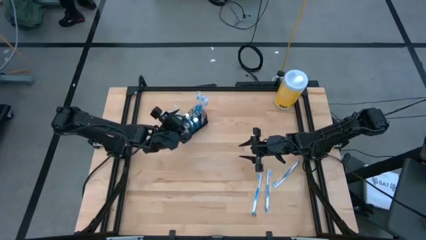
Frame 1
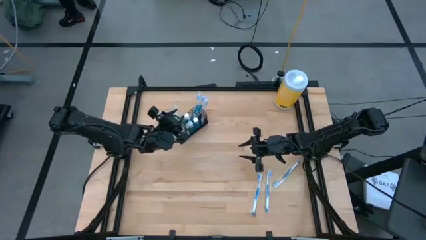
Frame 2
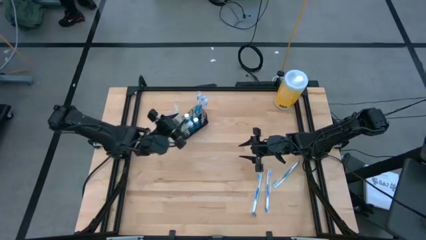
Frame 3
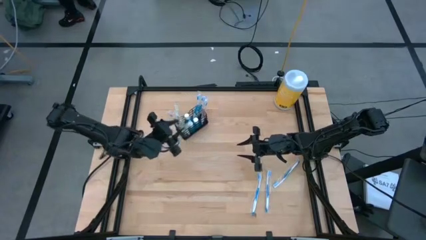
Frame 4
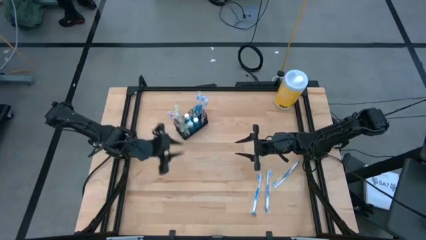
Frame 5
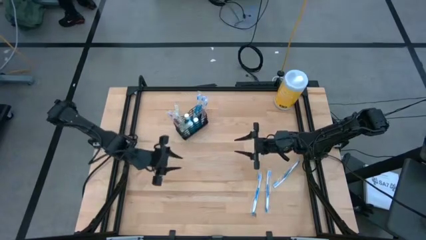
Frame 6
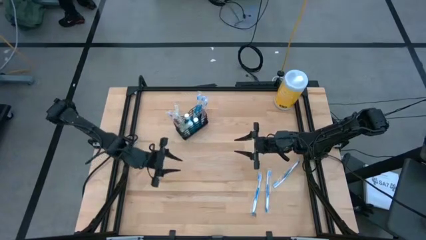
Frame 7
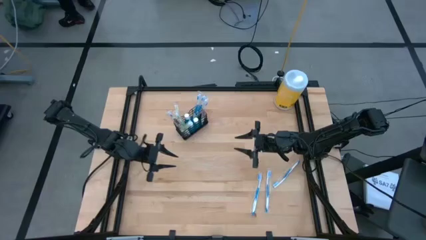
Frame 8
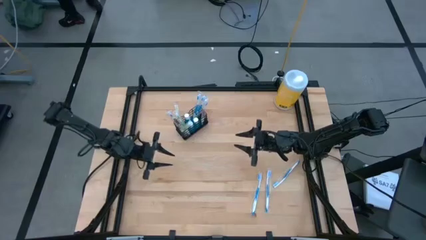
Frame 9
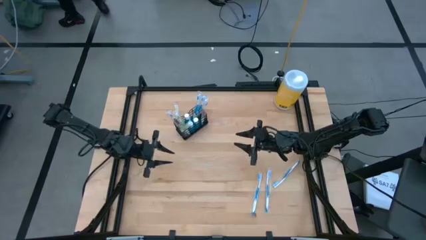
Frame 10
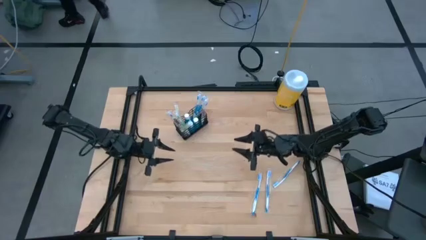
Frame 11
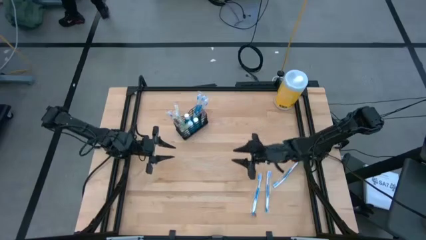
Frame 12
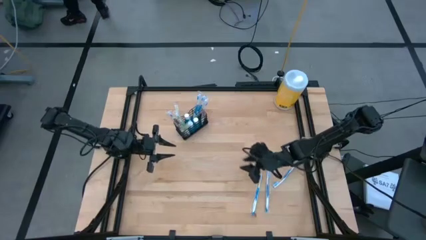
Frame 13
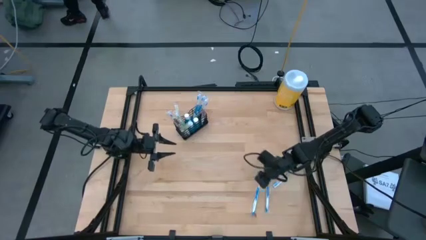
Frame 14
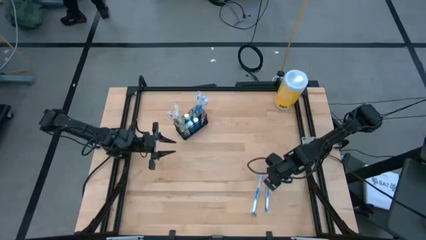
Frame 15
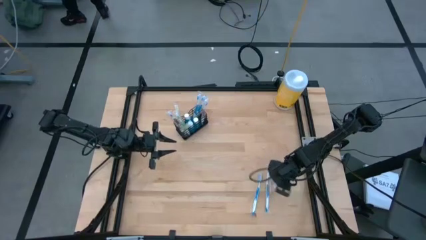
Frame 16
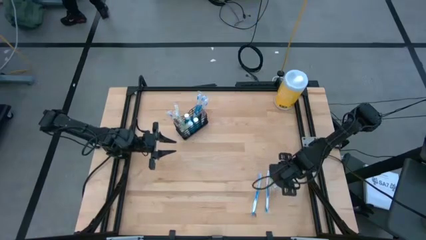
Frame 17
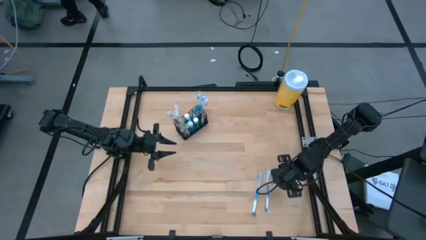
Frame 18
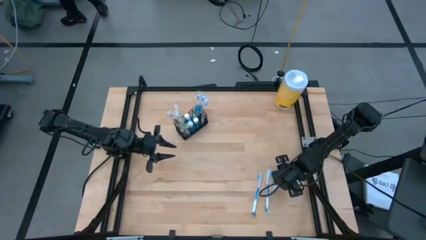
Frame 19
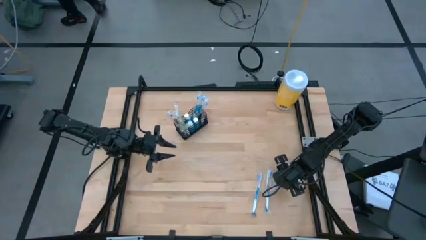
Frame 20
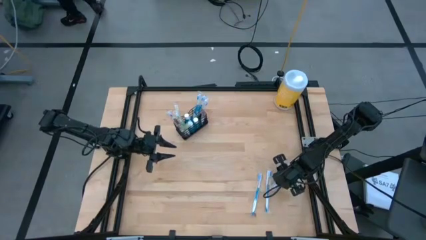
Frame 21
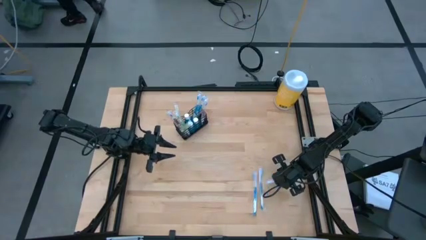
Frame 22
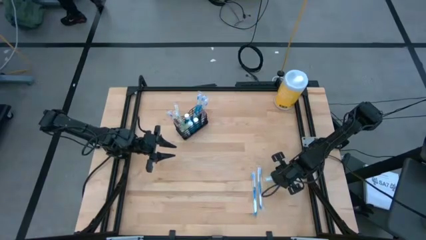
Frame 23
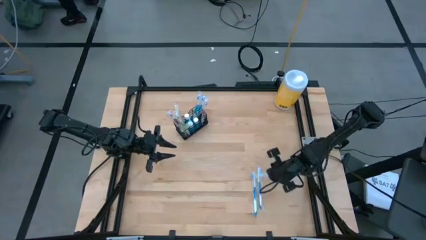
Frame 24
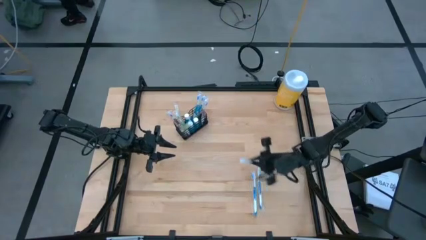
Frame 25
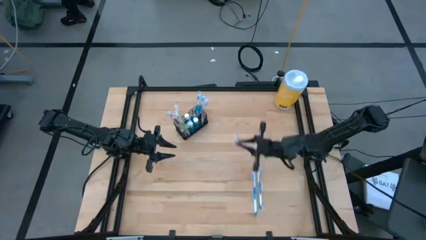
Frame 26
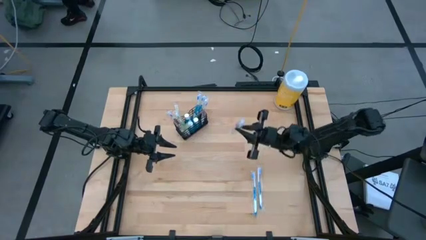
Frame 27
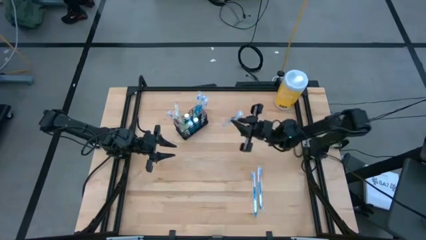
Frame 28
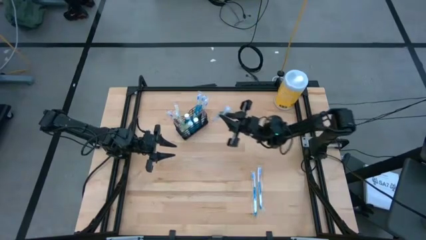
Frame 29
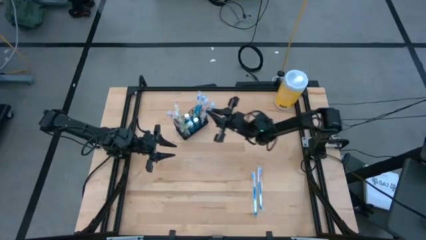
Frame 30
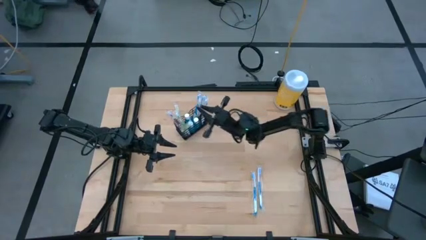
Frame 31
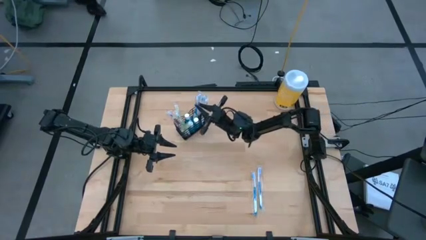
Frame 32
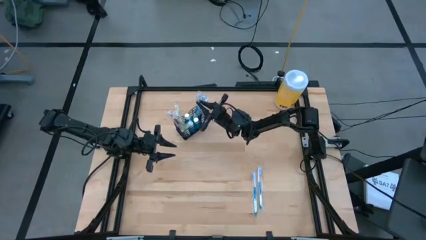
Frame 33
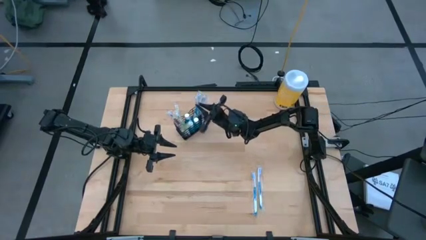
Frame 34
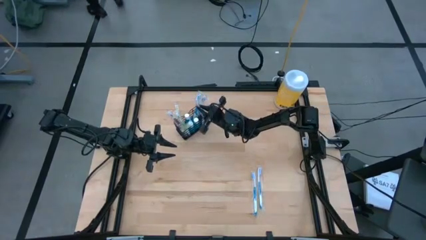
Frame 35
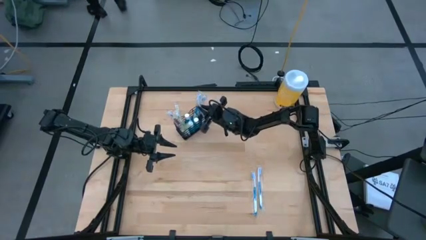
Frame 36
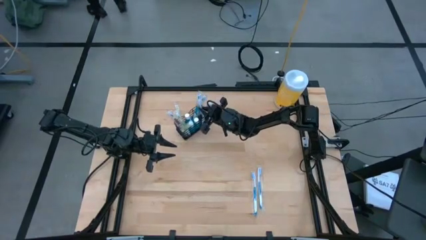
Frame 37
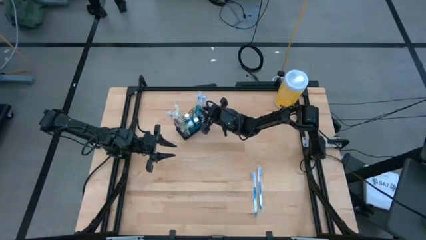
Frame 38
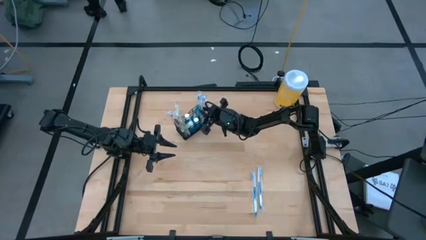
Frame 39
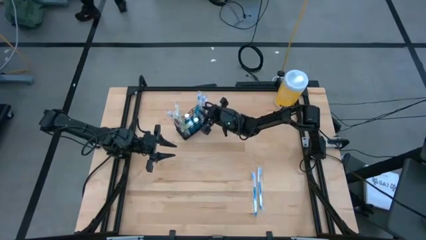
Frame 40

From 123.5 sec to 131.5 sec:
Task: Pick & Place toothbrushing station
Put the blue toothbrush into the black wire organizer

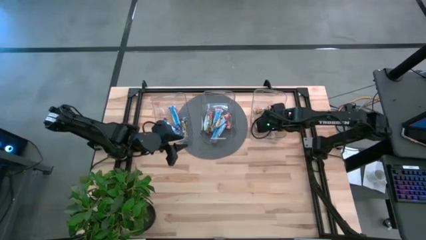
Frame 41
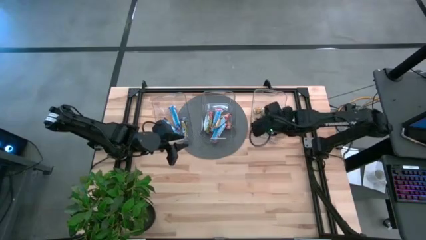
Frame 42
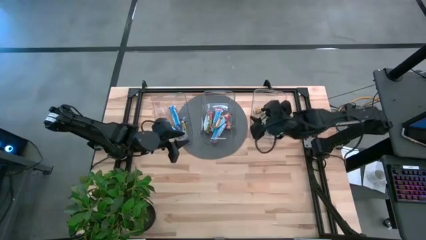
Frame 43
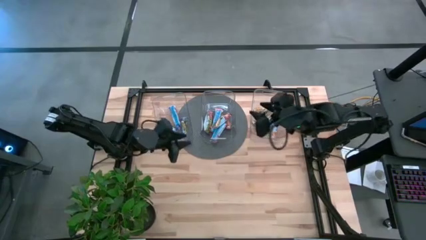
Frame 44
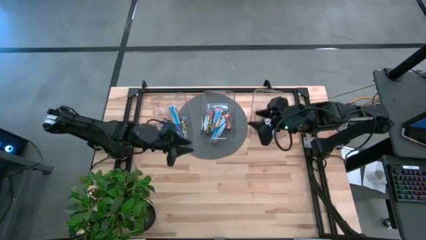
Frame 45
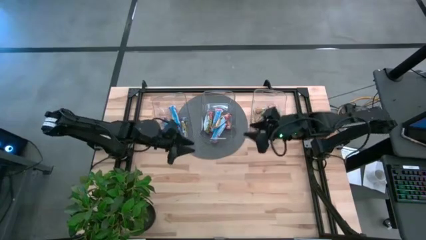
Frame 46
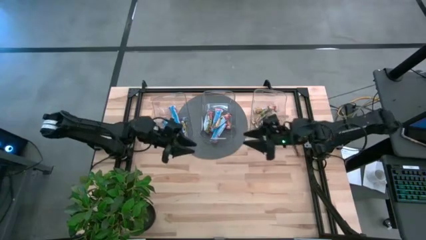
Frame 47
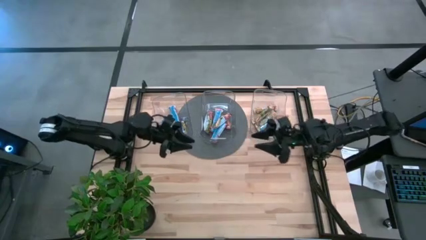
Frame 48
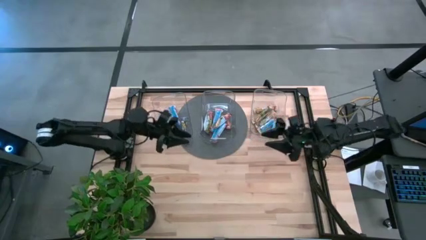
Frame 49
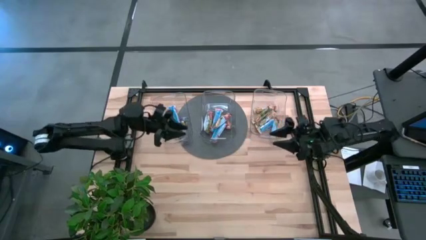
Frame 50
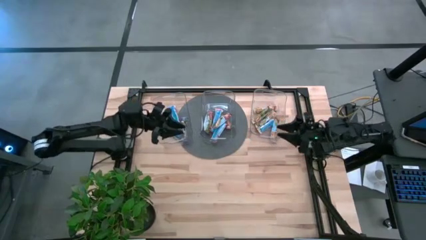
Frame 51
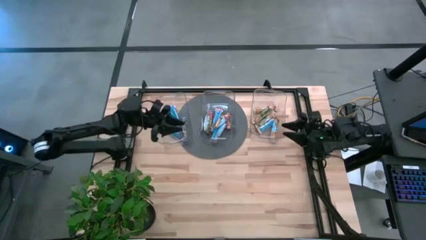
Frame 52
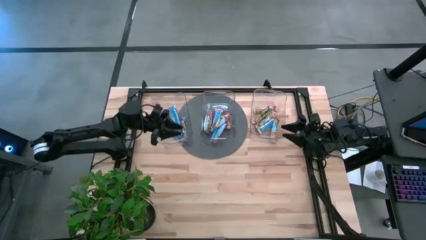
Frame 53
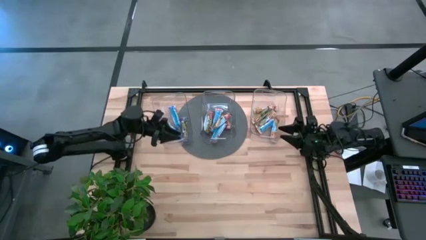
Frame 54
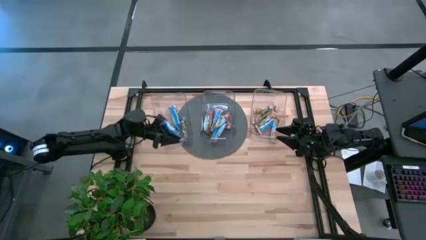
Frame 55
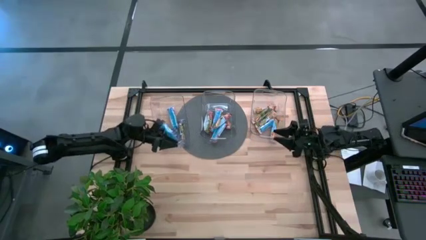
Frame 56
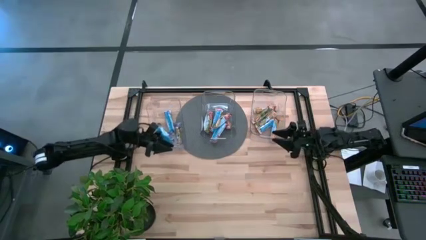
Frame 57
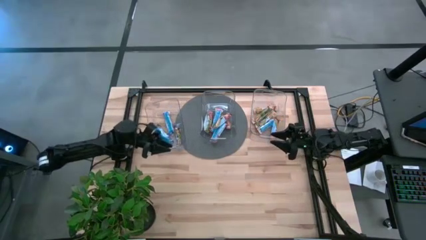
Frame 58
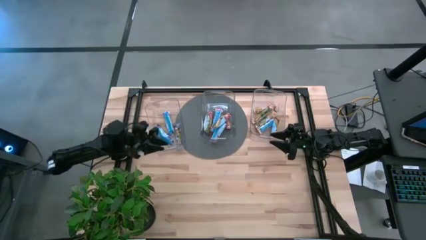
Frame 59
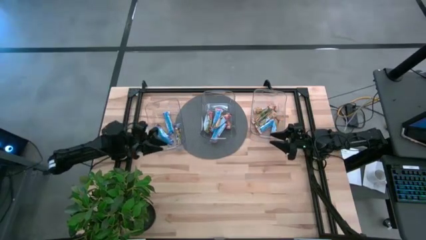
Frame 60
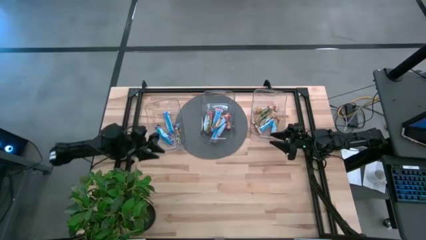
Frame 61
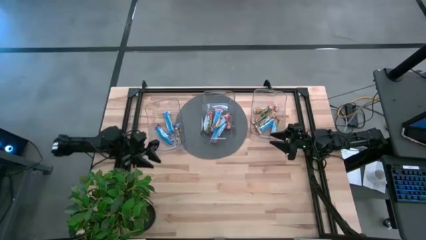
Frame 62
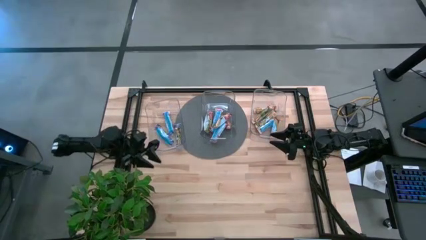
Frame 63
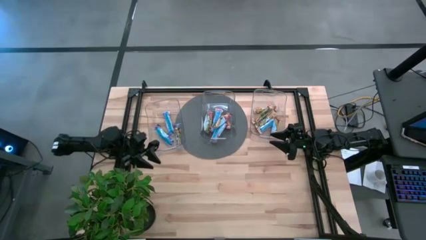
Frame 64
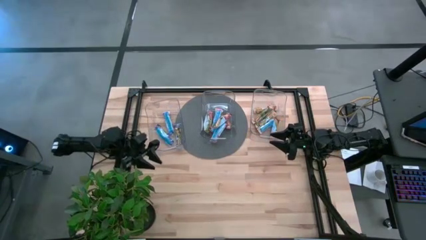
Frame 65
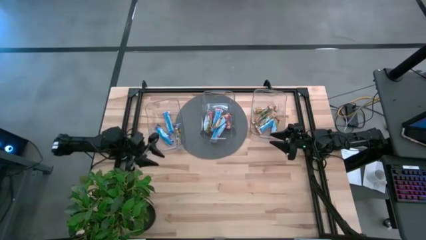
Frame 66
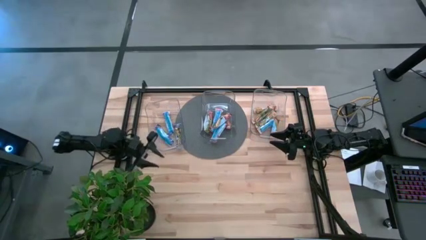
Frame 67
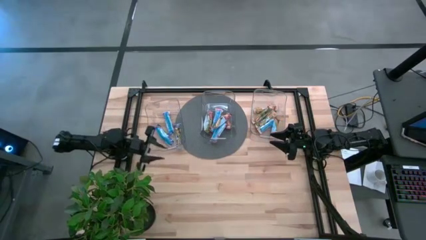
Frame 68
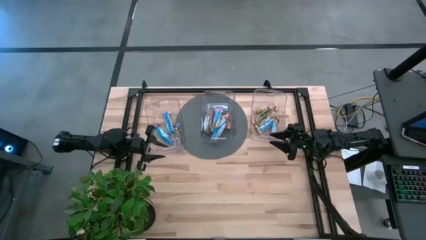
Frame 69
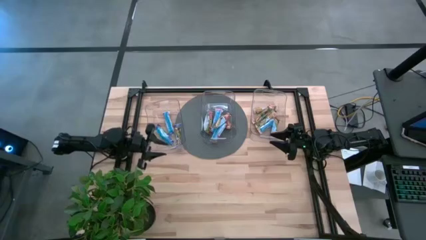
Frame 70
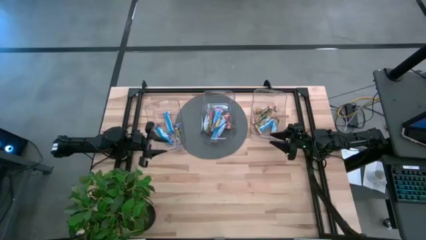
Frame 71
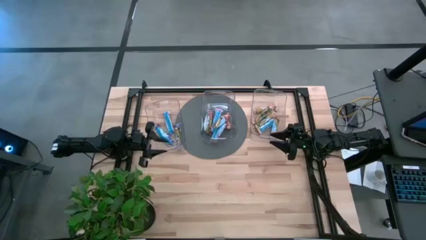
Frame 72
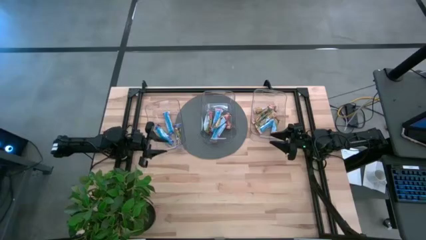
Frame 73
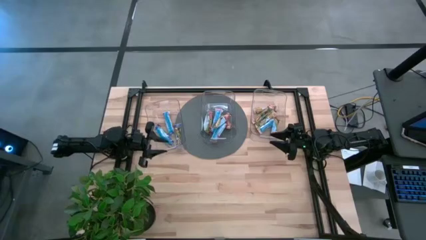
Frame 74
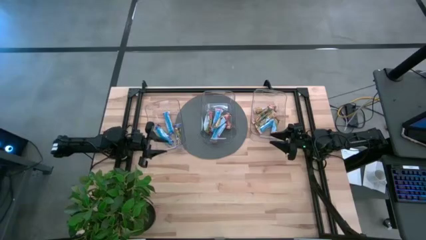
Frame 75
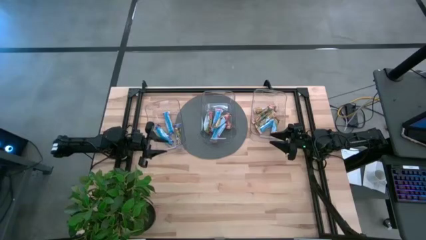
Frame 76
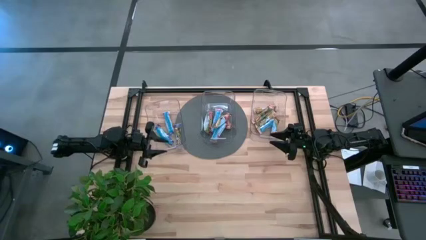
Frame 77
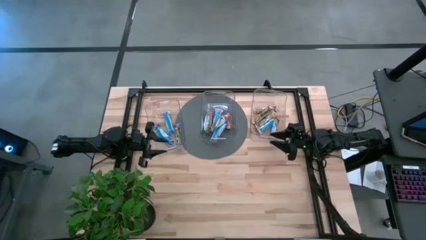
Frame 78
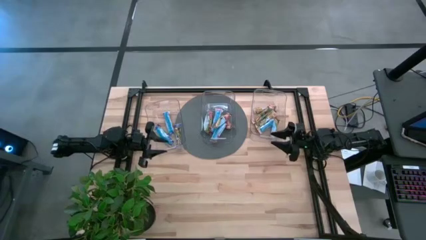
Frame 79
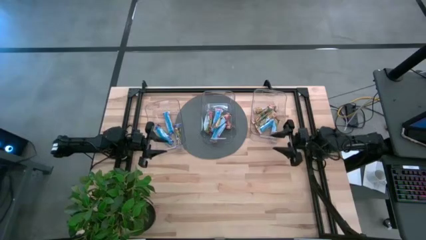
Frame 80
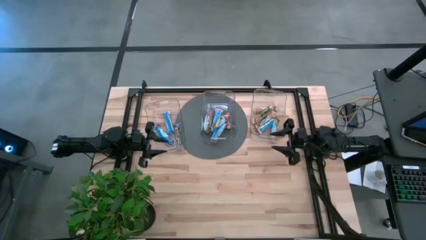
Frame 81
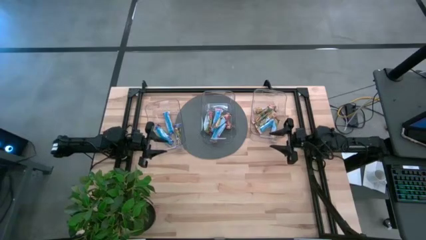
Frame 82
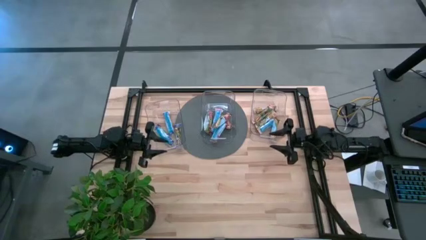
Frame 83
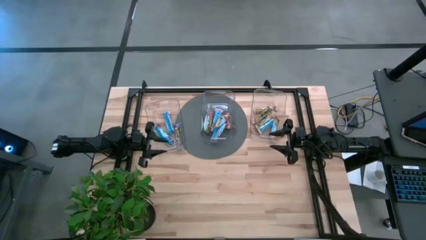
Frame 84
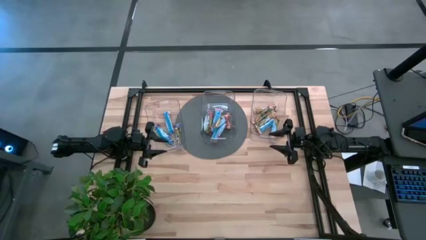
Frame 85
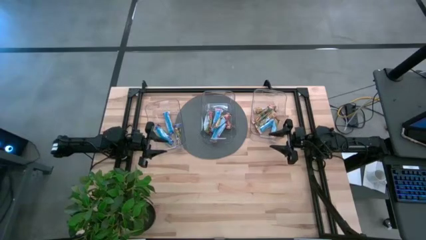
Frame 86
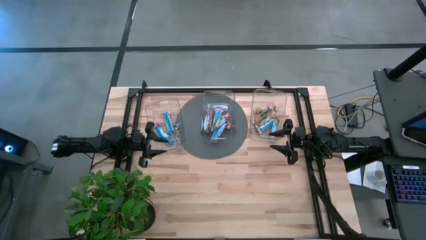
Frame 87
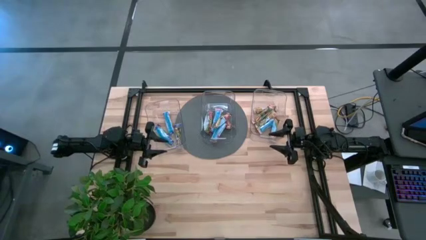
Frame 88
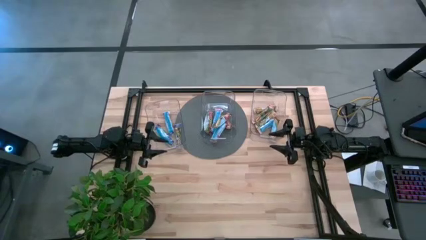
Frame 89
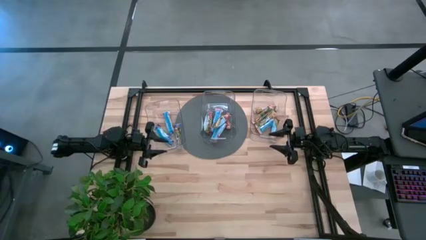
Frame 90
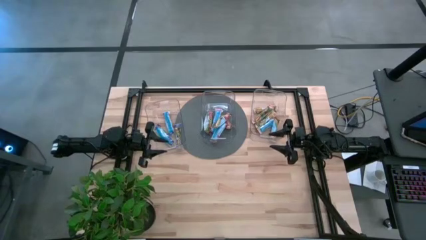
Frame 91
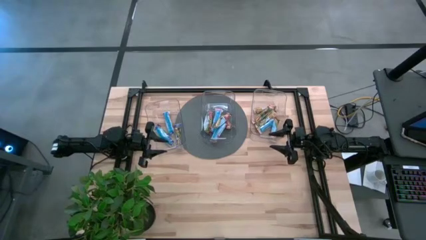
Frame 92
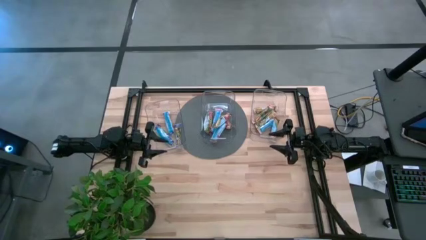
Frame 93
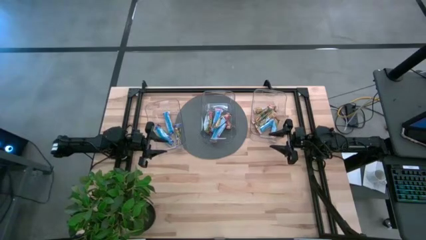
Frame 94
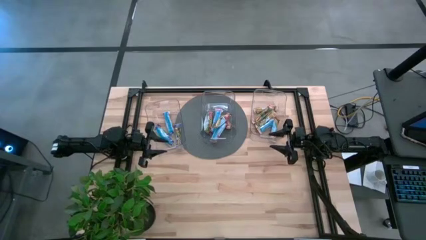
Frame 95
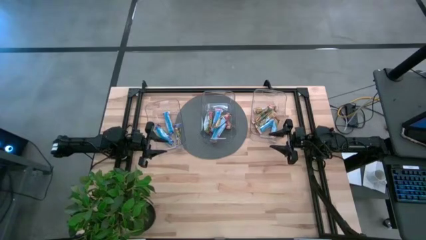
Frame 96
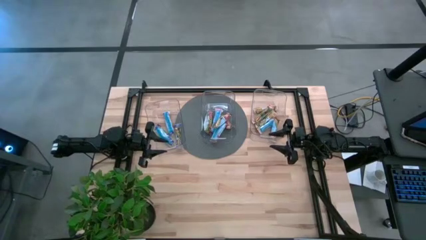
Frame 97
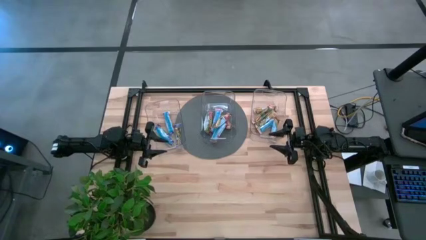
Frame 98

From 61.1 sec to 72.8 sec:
Task: Pick and place Granola Bars by type
Return to Home Position
